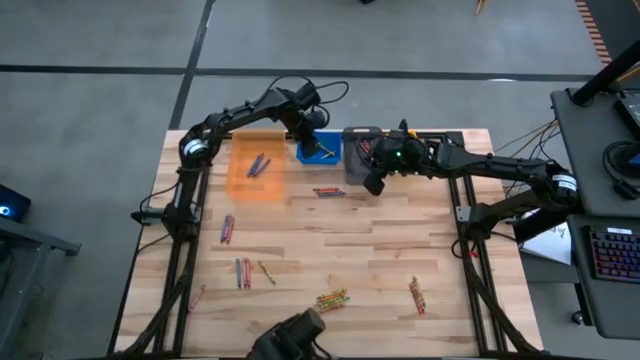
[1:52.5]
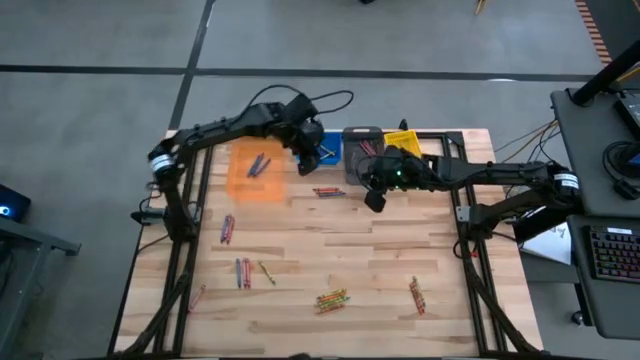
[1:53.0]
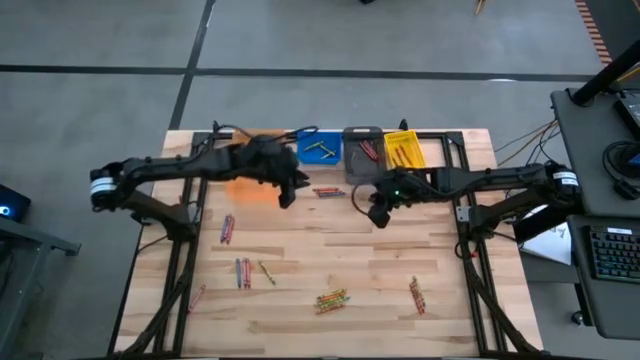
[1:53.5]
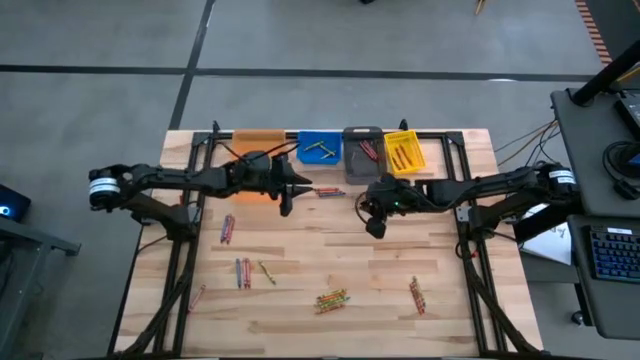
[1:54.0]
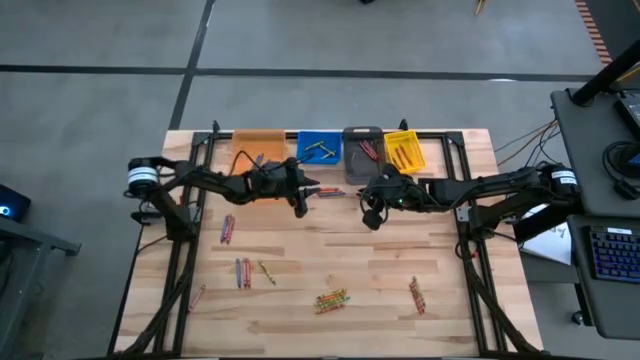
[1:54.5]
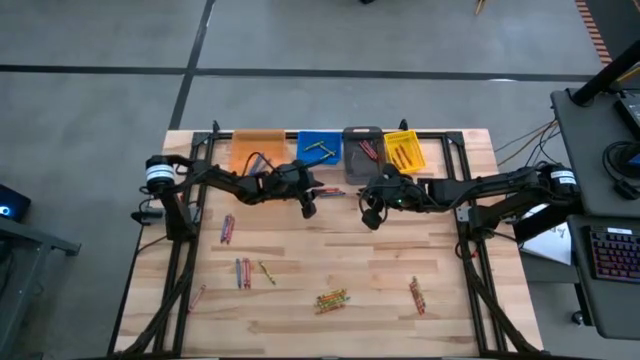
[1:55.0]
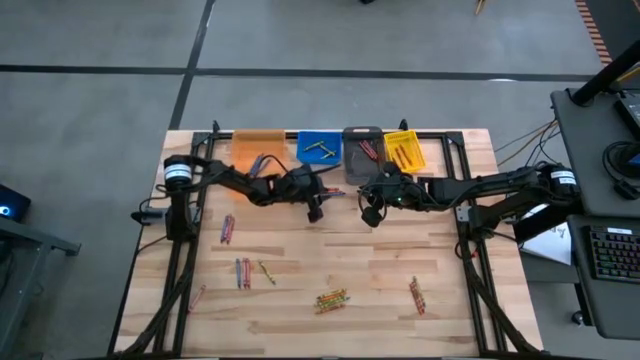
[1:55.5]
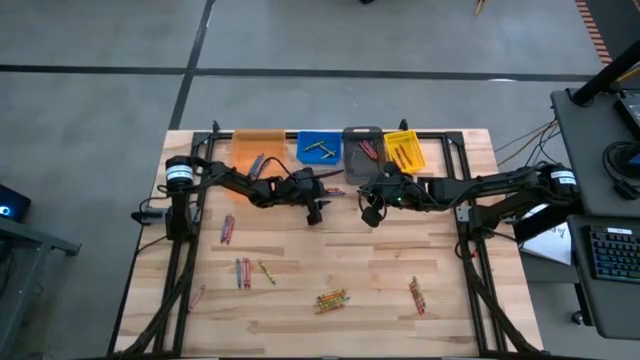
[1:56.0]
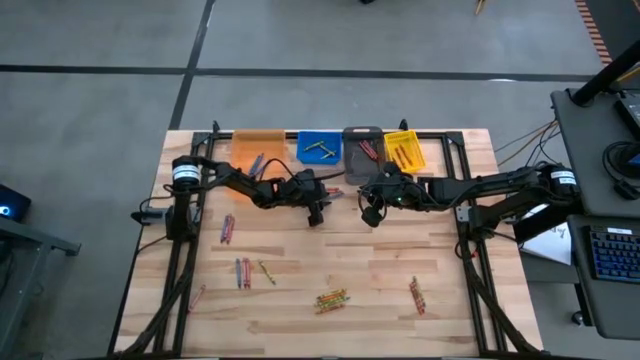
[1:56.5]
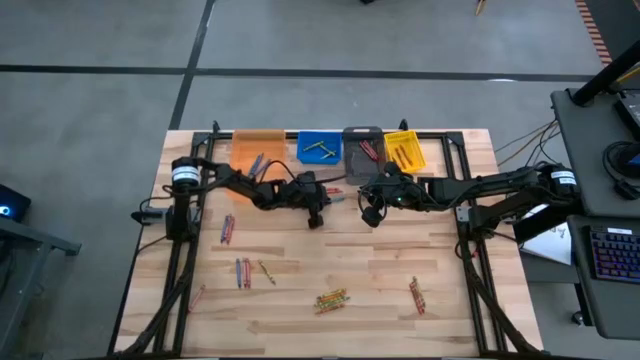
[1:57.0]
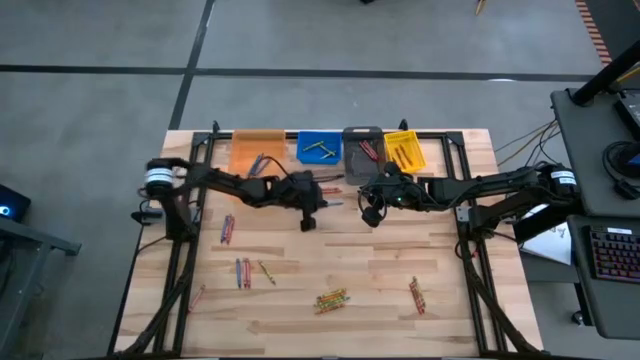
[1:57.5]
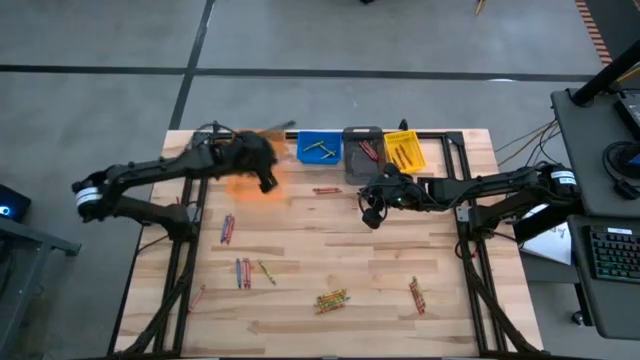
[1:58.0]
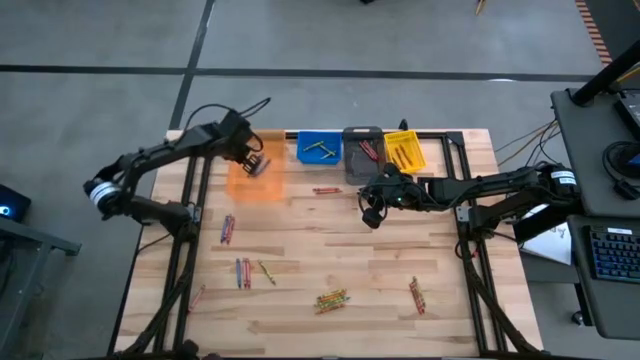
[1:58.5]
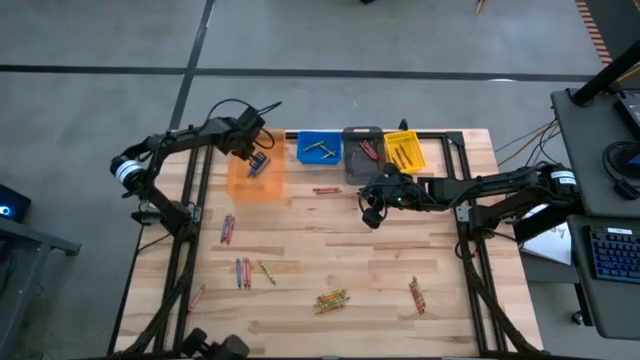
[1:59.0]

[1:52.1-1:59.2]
Task: Sort crayons
Put the blue crayon into the orange bin

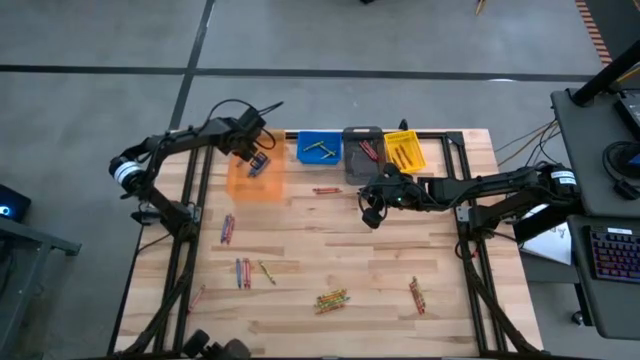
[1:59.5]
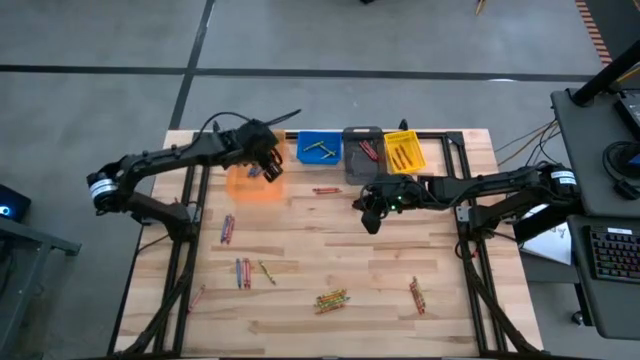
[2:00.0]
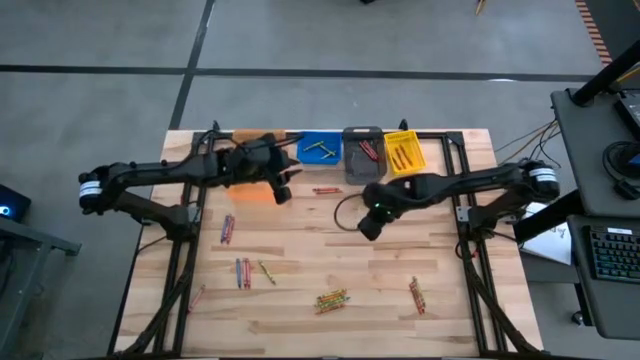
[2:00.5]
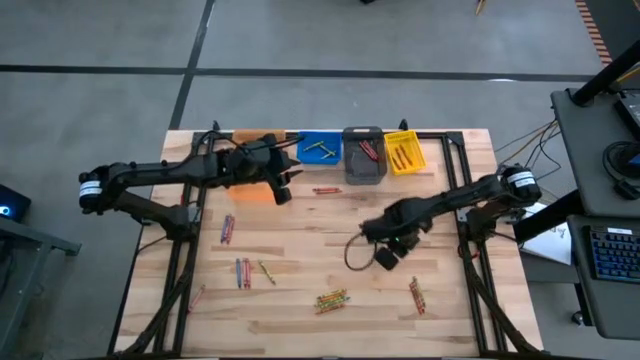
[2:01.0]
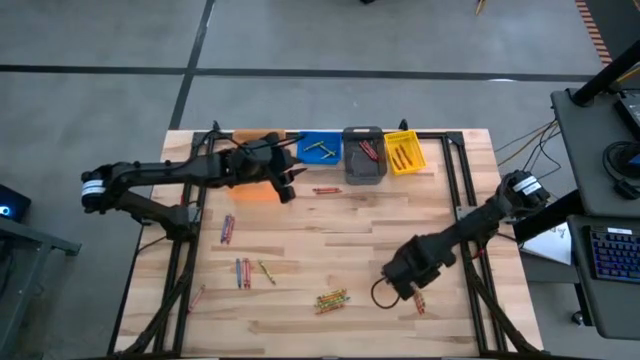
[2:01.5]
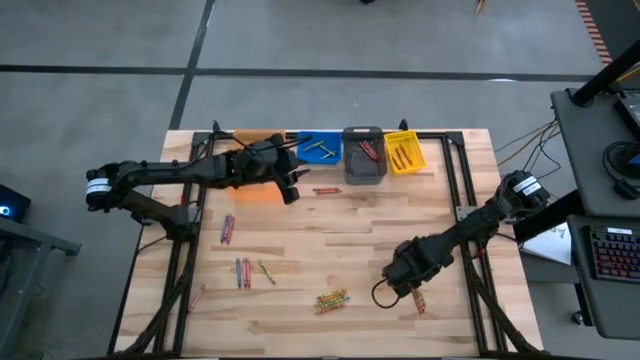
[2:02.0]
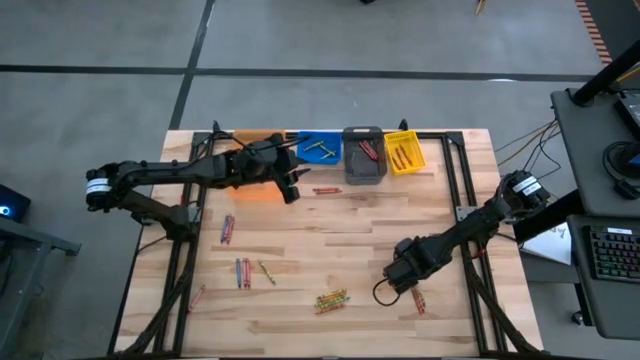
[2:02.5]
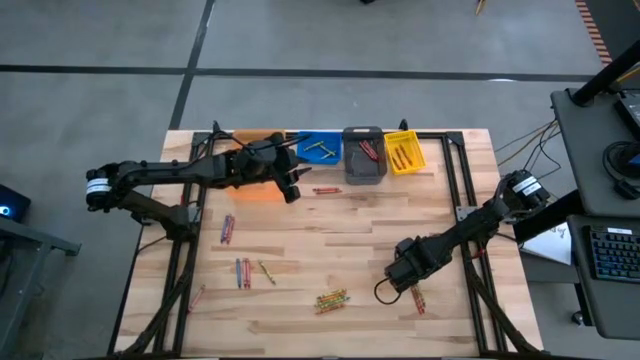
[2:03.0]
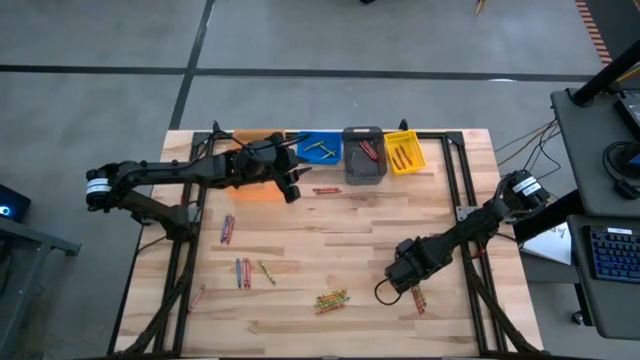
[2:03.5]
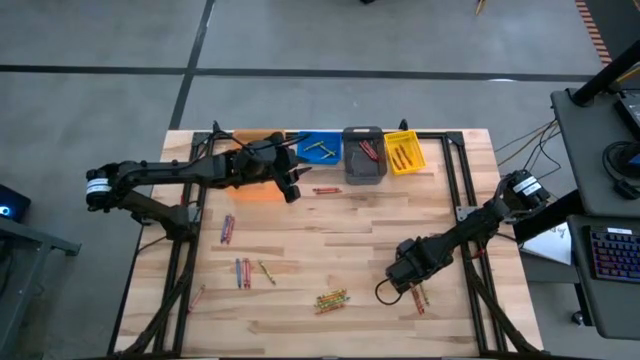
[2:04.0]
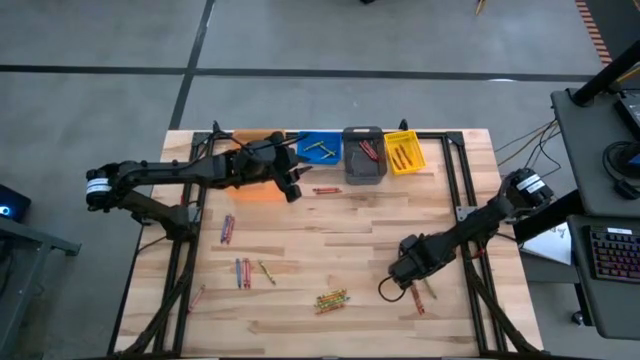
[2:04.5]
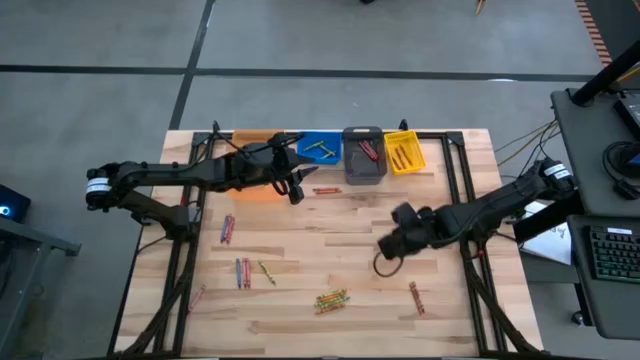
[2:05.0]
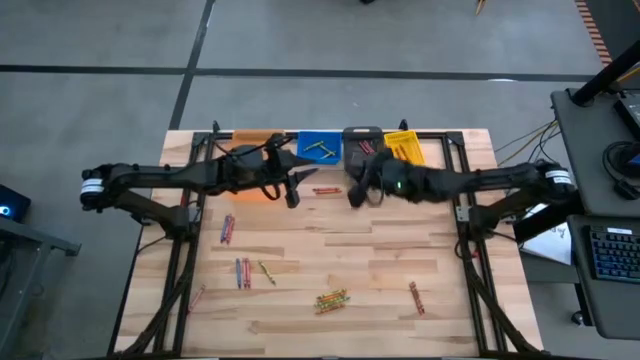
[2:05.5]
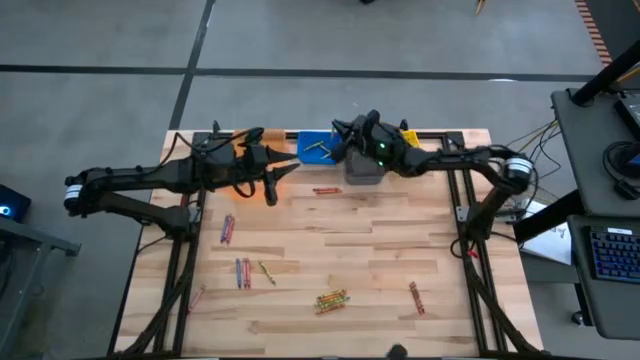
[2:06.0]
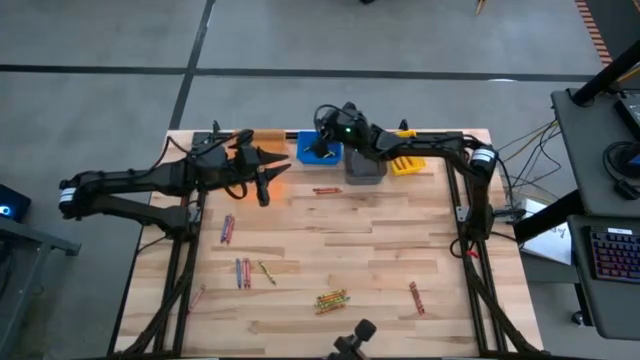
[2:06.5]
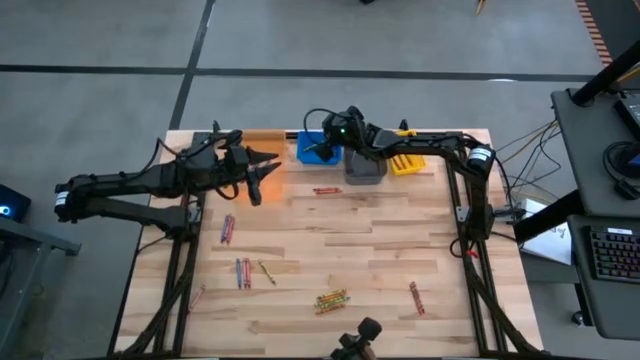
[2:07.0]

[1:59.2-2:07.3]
Put the green crayon into the blue bin

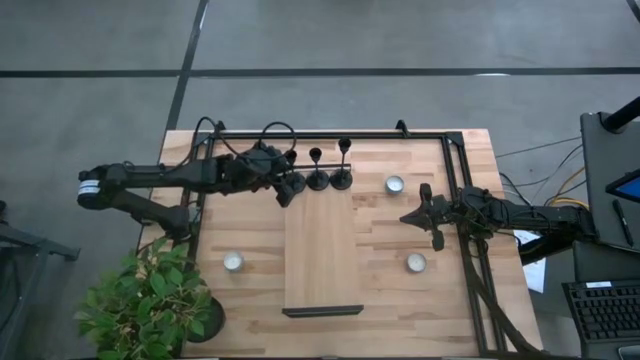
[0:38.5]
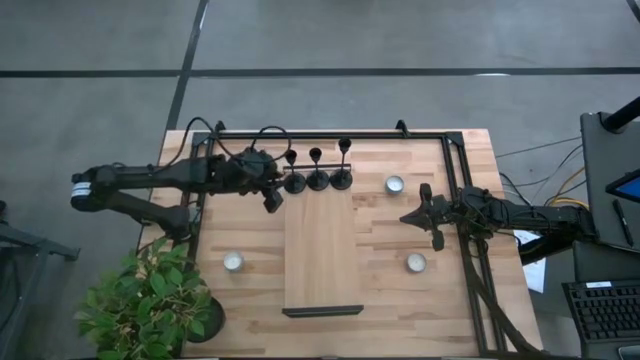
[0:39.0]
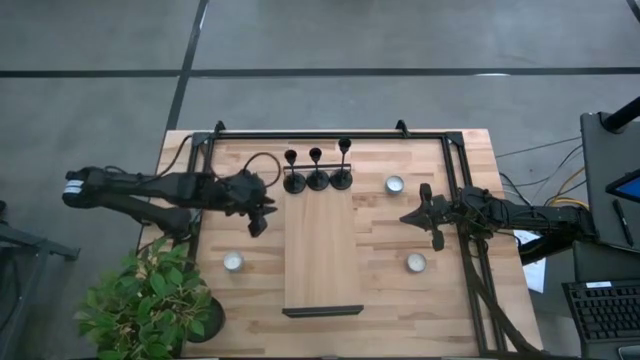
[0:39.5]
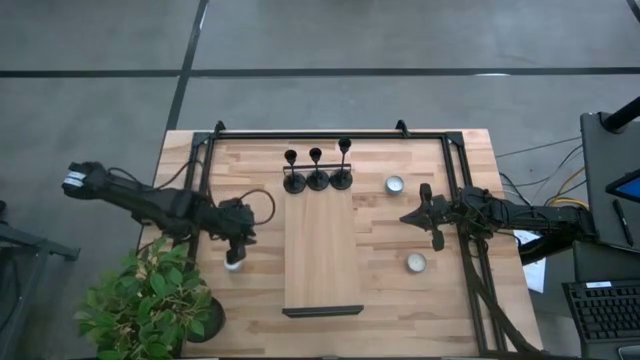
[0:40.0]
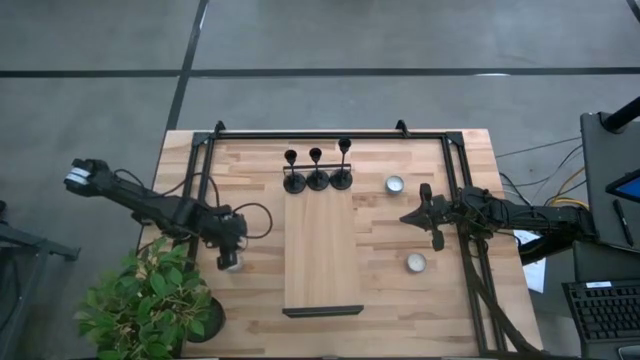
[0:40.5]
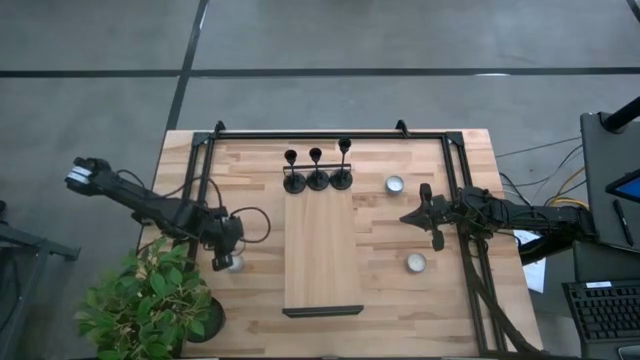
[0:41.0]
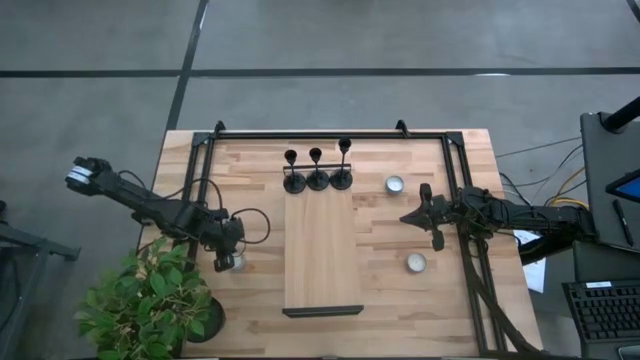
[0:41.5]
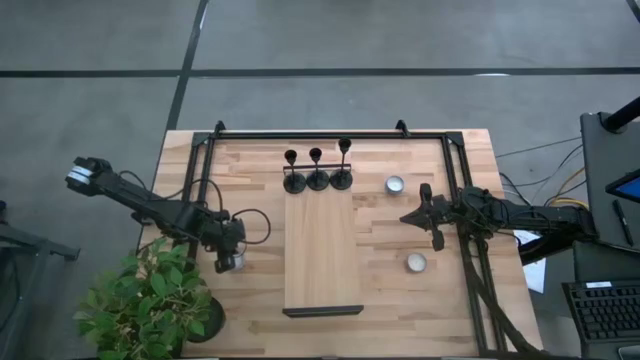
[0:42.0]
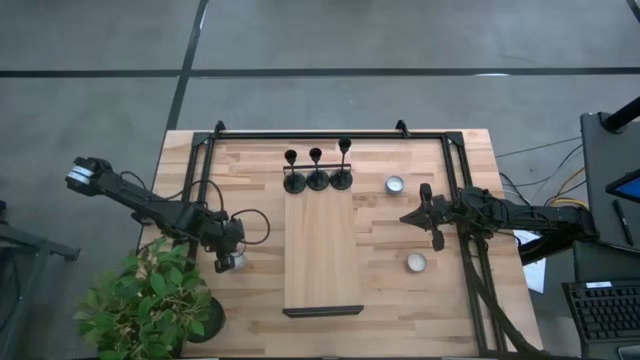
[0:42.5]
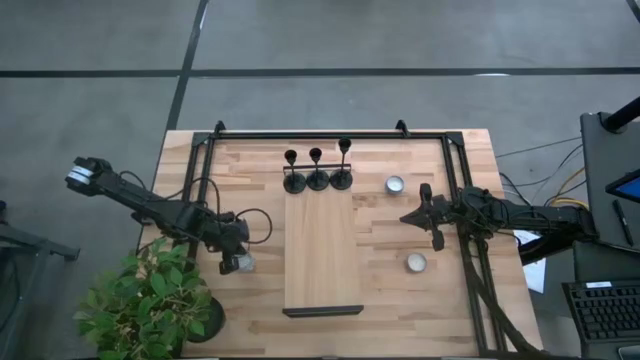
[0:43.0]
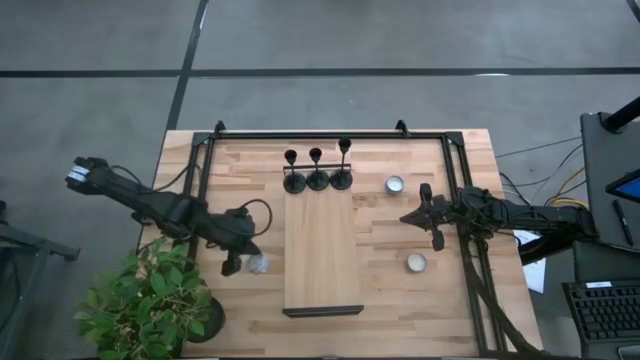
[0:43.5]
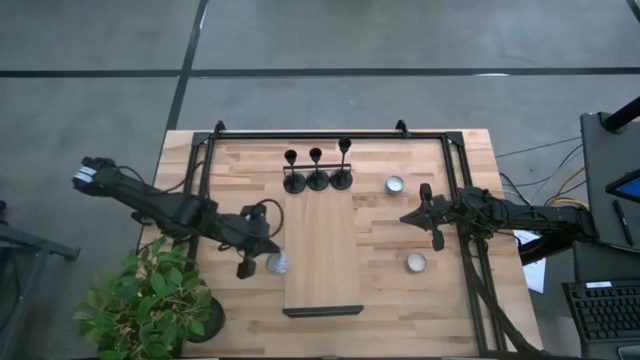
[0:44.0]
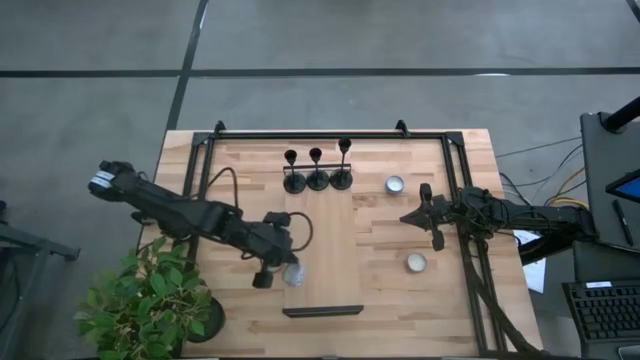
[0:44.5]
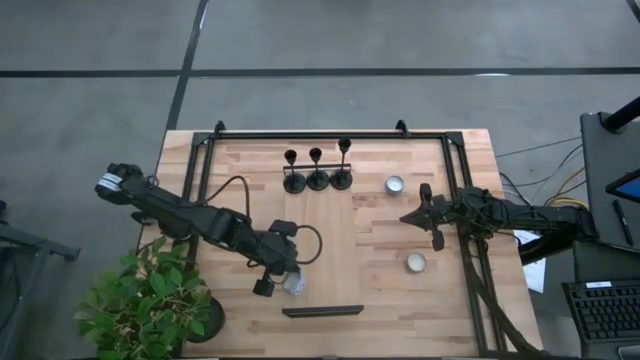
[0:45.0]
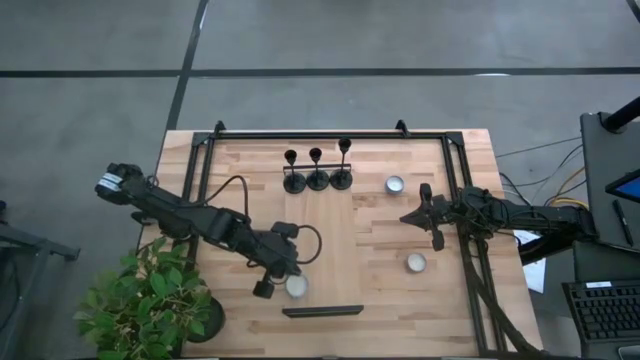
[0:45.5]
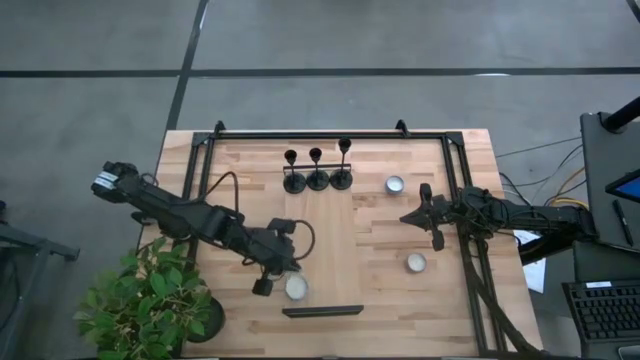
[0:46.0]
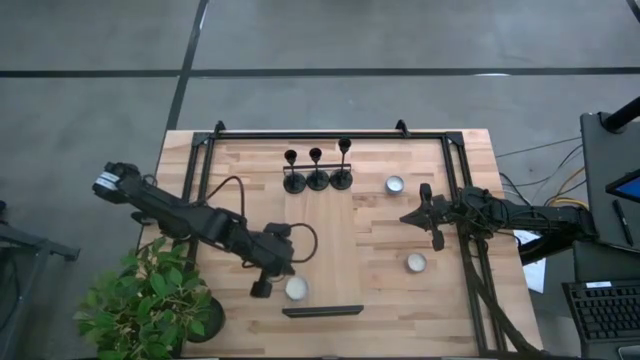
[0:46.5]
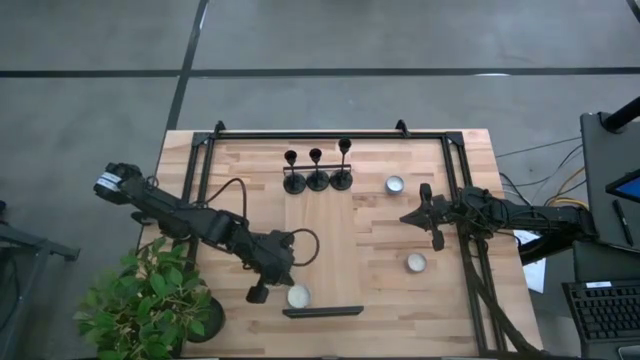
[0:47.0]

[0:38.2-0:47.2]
Task: Pick & Place candle stick holders
Put the red patterned scented candle on the shelf
